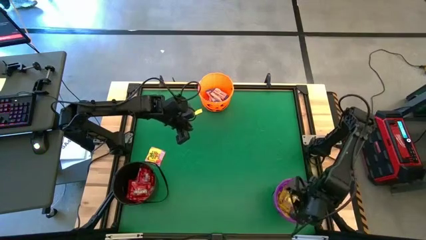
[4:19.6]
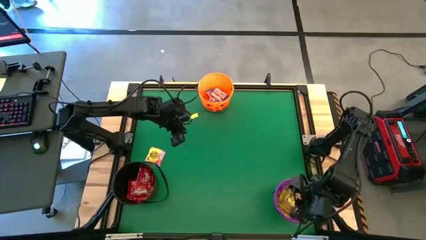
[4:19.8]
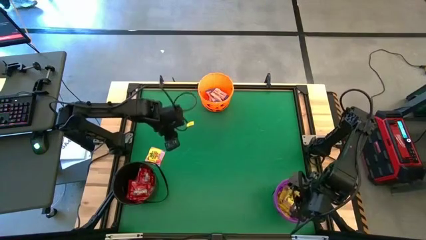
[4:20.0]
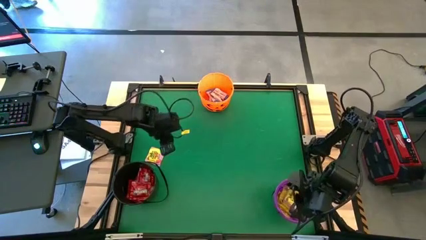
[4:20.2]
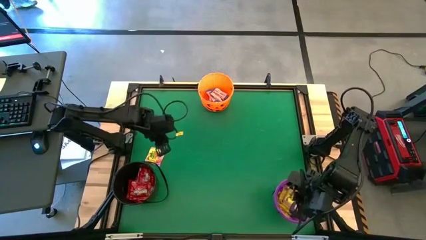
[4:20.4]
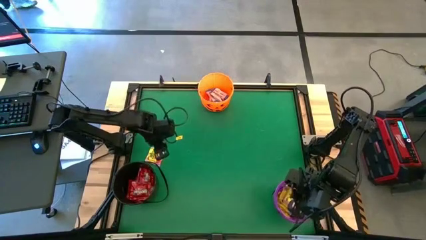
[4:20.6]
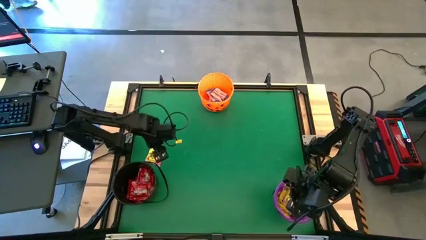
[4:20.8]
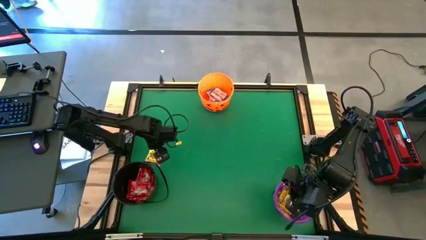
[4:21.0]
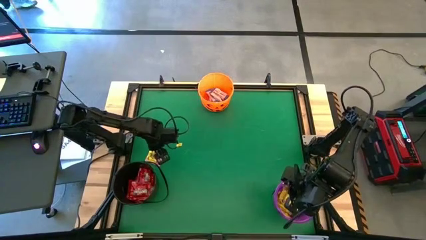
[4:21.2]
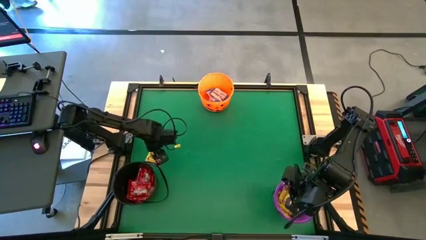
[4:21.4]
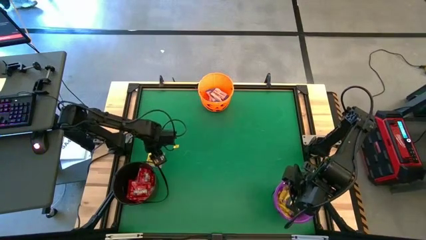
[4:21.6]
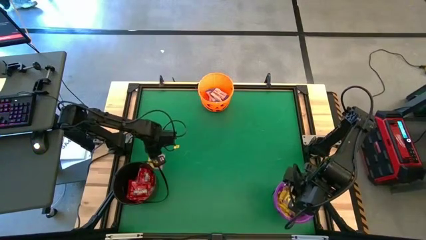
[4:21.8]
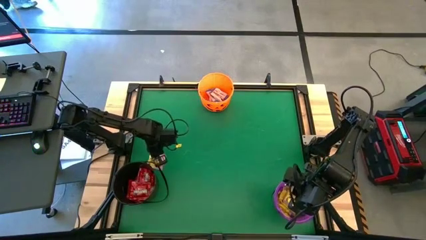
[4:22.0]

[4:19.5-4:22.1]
Task: Sort candy by brand, put in halloween buckets
Put the yellow candy into the purple bucket

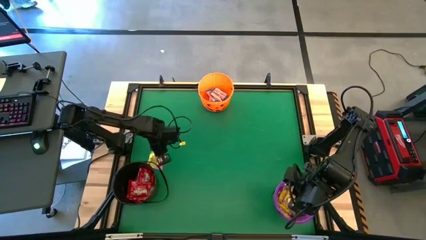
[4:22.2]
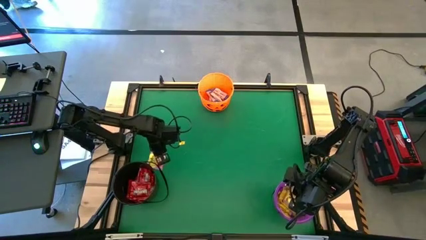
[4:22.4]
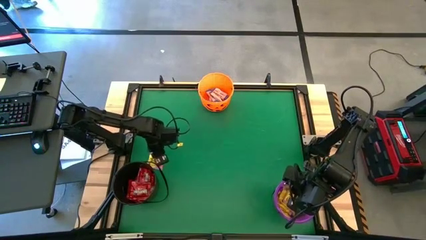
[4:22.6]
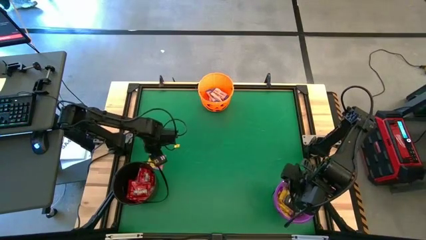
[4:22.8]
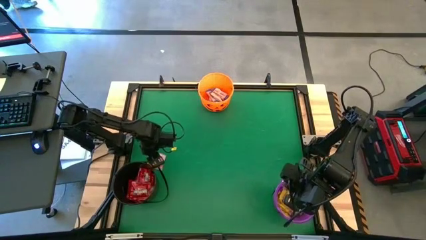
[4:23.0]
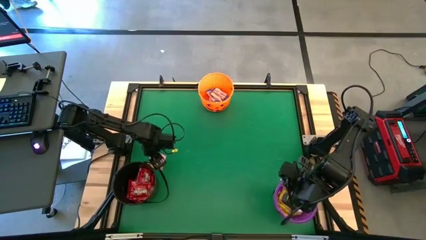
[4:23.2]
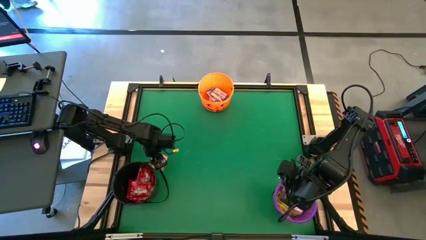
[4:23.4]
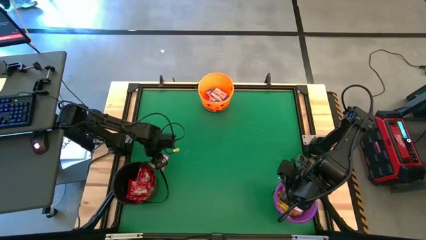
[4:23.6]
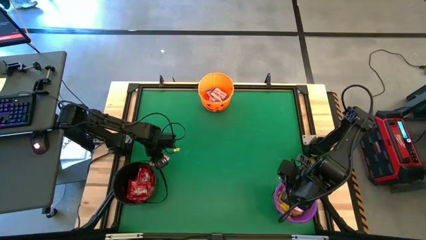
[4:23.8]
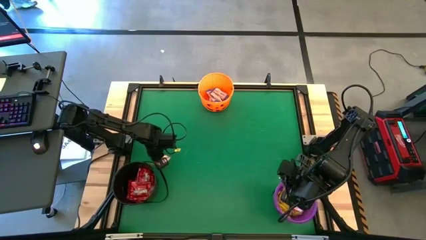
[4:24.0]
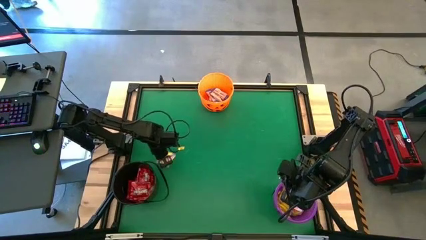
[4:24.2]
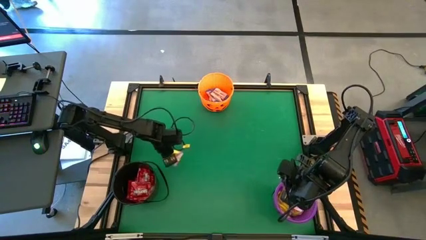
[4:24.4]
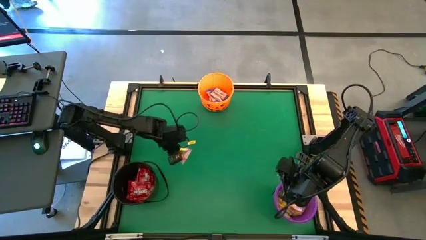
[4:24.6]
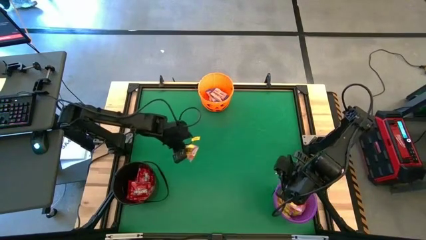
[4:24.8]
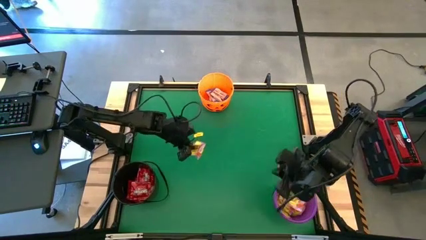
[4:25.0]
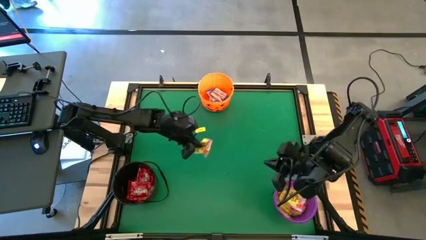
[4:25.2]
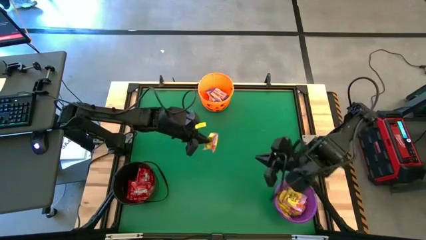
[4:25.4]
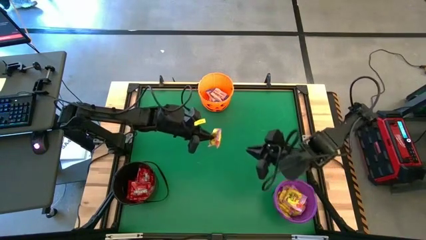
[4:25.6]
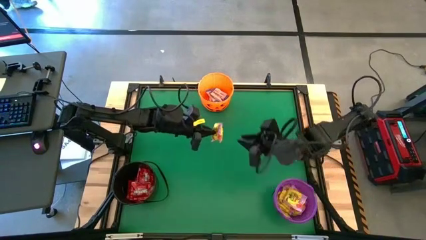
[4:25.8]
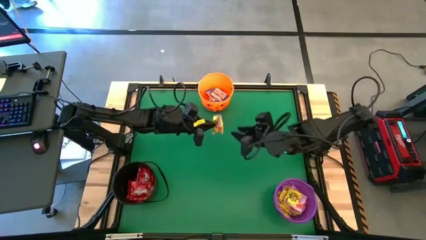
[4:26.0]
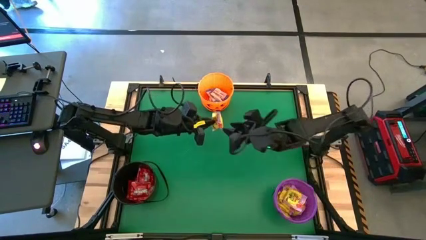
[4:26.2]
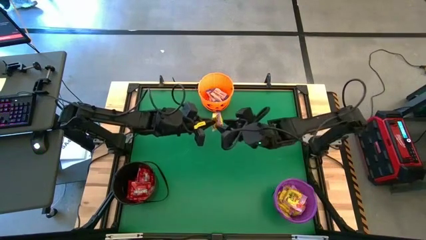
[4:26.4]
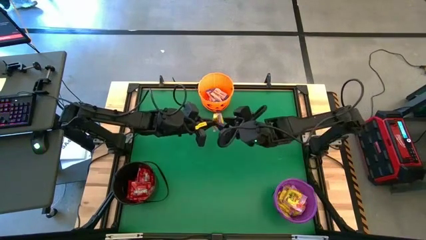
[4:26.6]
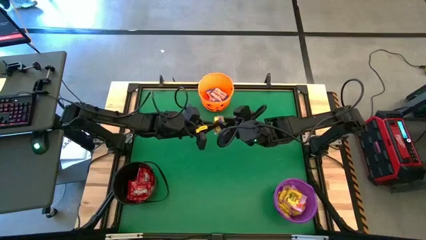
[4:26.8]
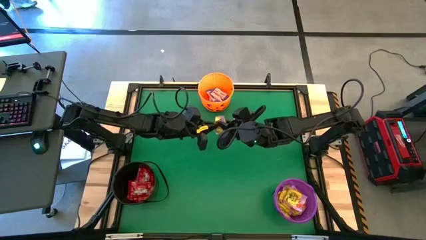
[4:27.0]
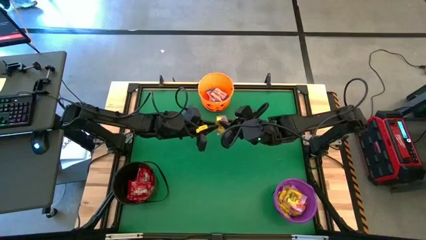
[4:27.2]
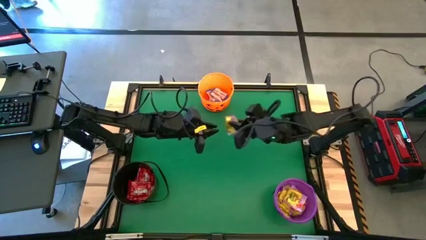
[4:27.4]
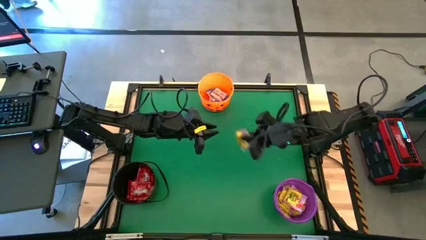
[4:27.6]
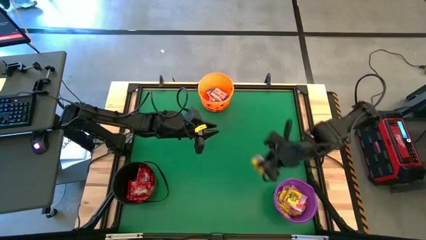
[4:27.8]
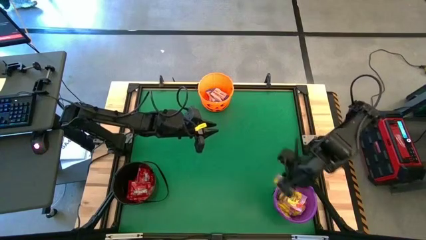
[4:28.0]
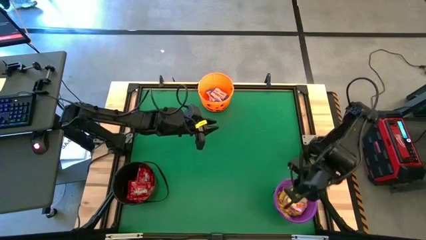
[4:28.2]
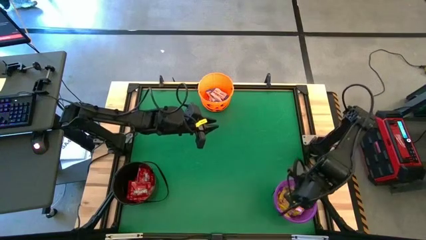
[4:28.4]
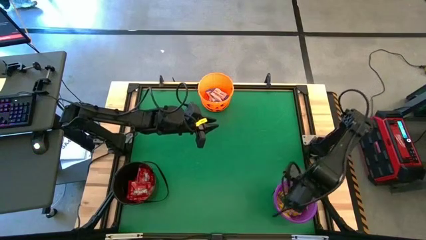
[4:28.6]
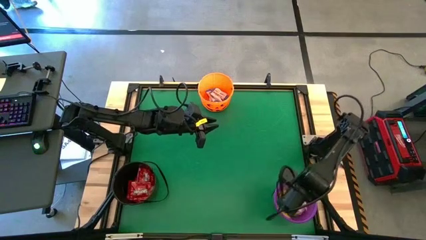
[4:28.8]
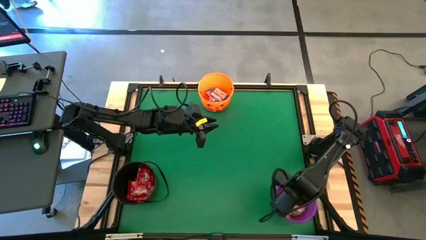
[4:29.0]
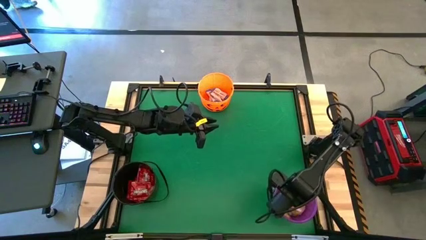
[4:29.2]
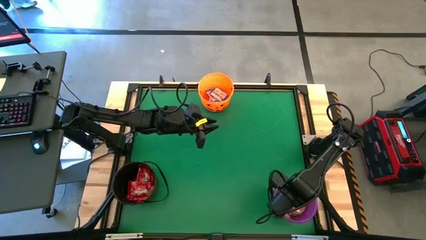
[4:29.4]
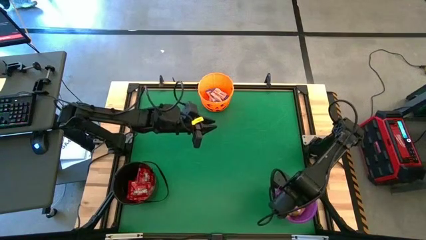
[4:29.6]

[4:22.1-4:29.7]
Put the yellow candy in the purple bucket

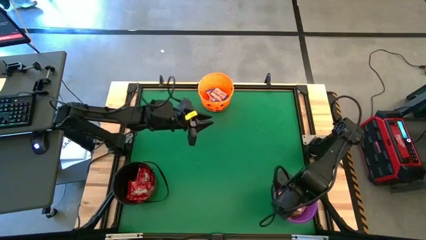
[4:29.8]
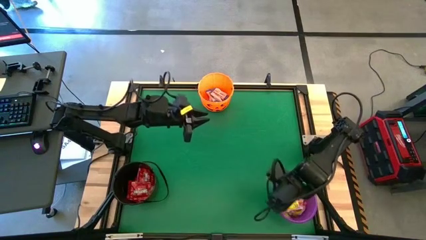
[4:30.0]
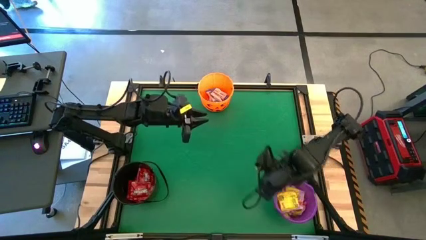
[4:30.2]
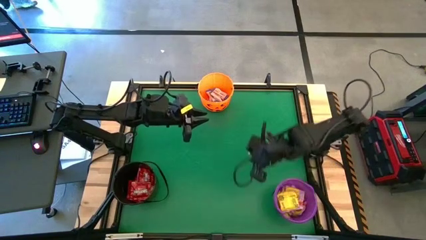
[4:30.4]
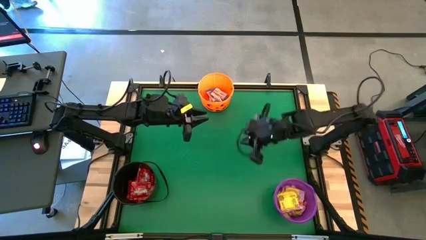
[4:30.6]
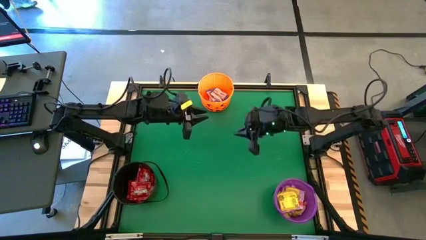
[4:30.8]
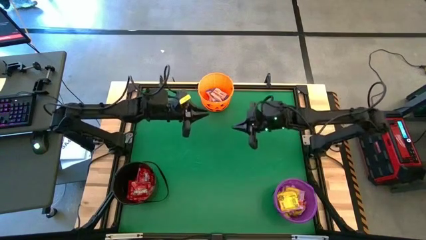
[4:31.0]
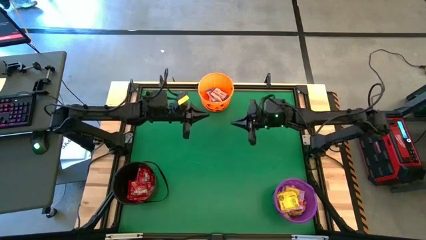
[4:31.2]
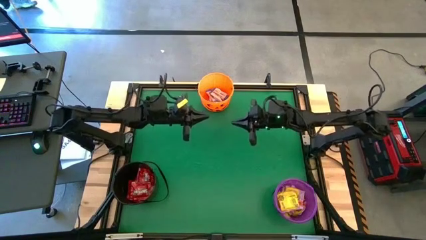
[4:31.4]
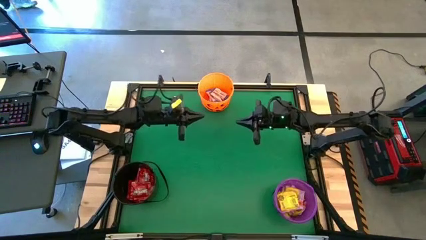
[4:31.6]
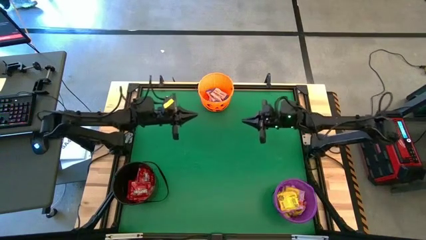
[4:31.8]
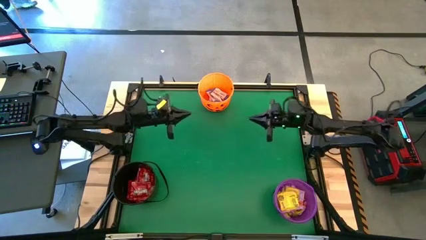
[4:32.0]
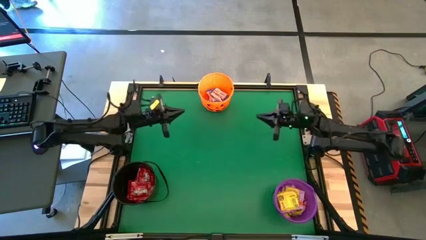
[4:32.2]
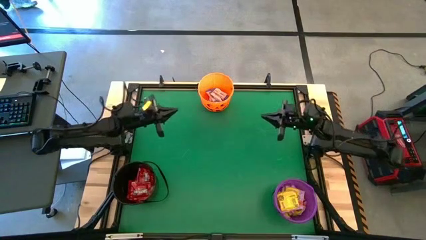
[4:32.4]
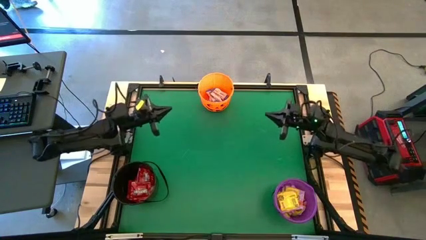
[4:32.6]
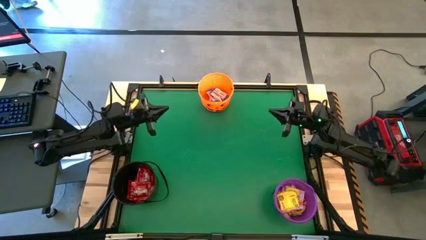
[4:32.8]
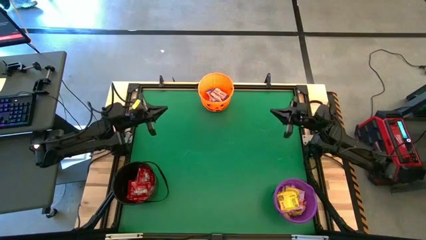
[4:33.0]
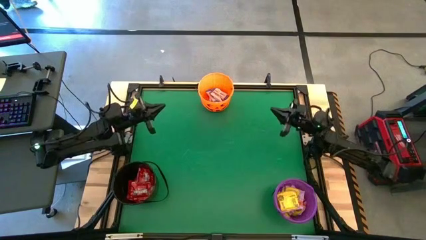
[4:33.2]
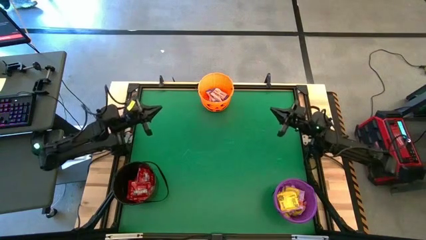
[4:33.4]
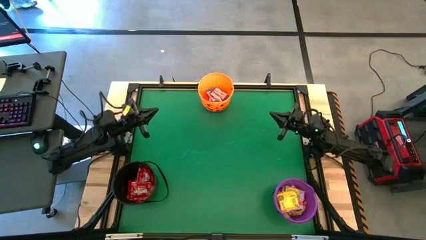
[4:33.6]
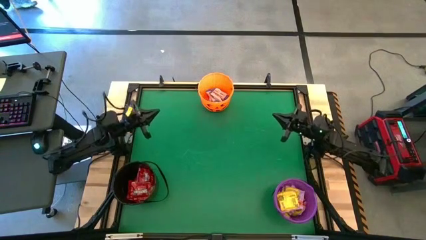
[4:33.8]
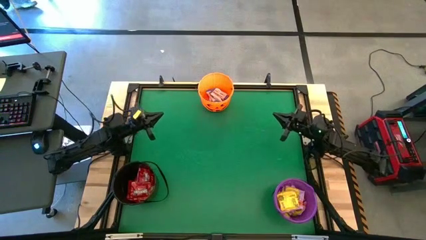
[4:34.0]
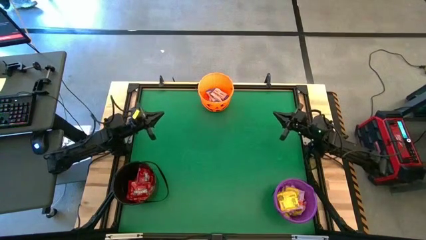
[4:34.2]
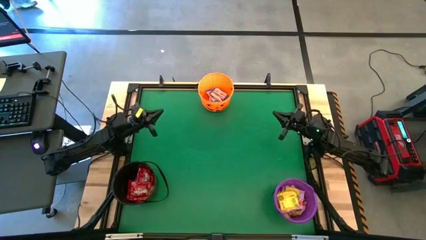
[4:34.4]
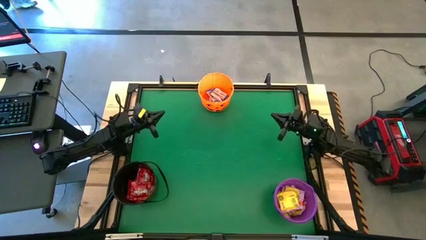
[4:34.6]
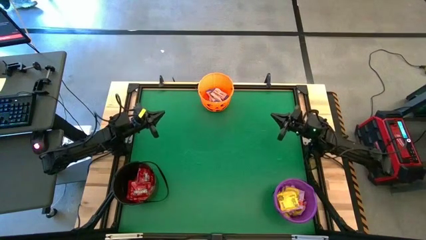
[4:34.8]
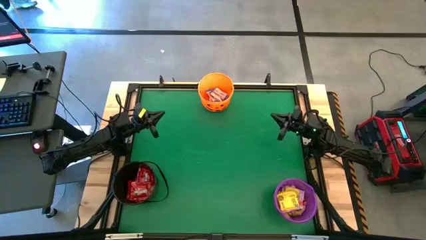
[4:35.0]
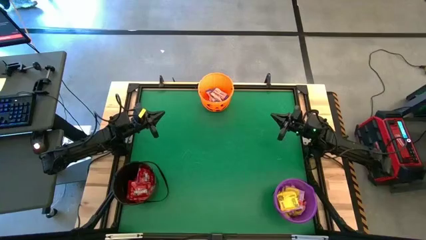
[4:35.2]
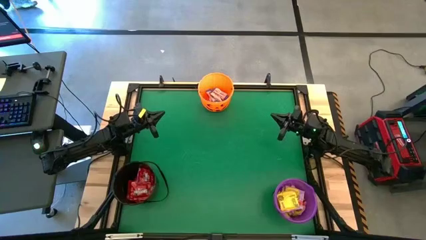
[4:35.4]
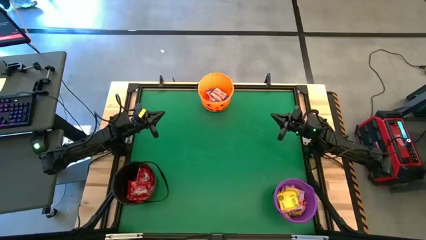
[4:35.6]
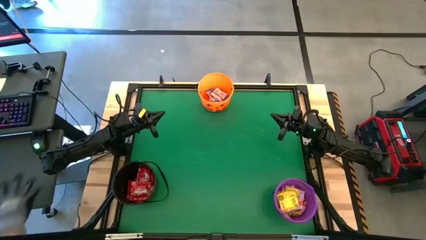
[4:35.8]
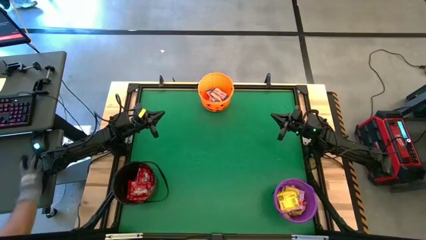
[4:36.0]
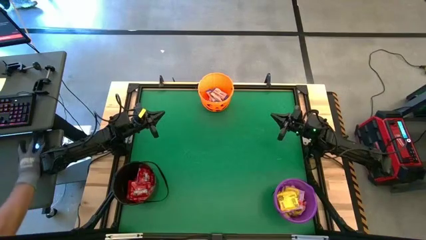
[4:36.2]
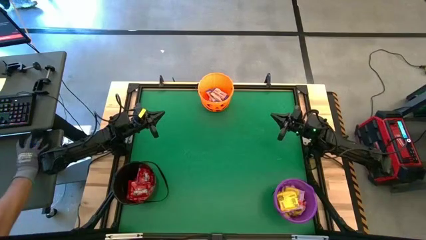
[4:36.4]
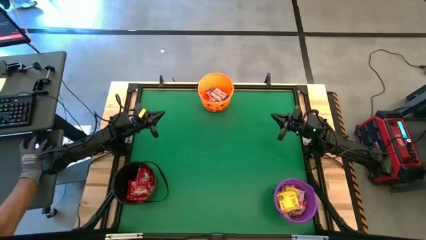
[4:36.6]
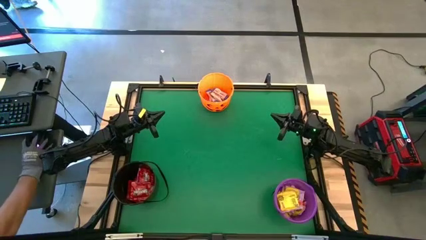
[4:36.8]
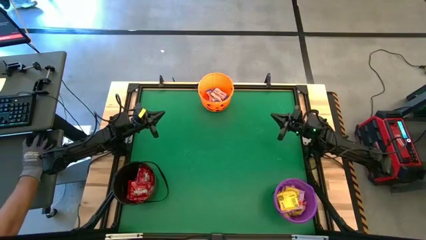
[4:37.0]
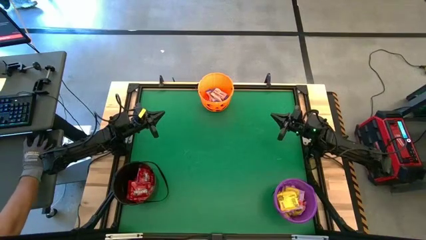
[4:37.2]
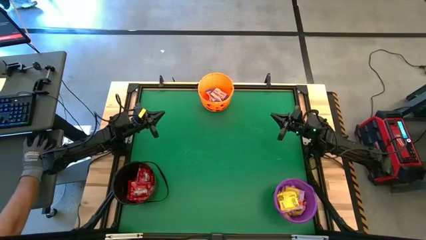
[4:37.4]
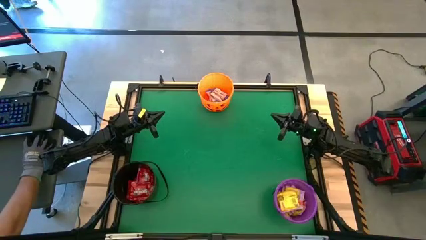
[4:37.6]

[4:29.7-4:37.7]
Return to Home Position
